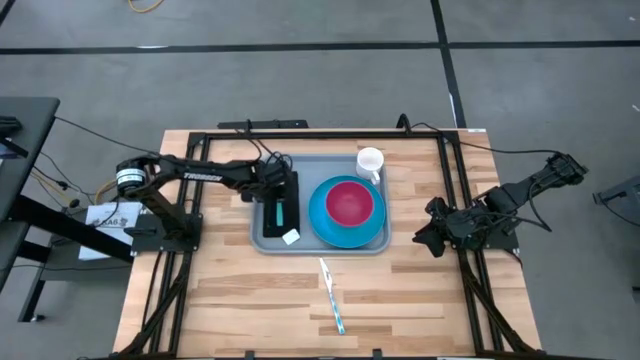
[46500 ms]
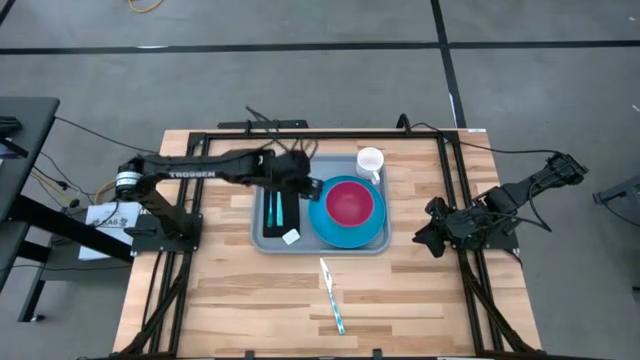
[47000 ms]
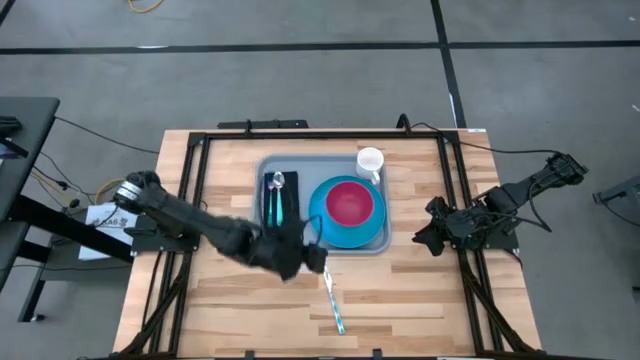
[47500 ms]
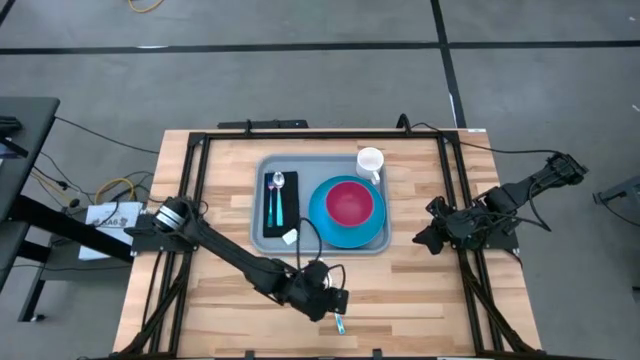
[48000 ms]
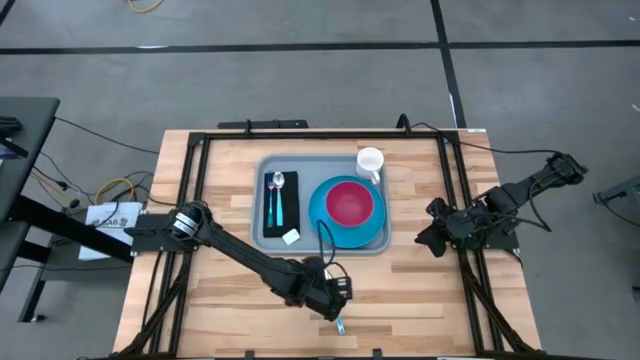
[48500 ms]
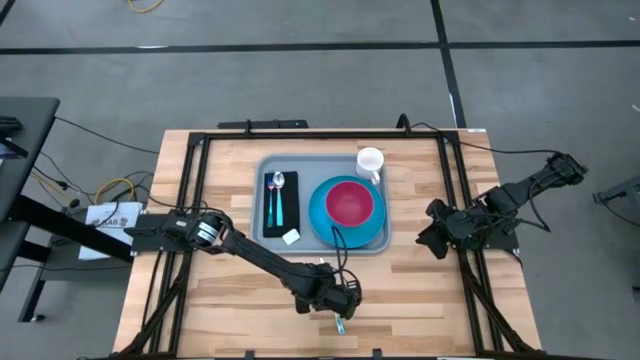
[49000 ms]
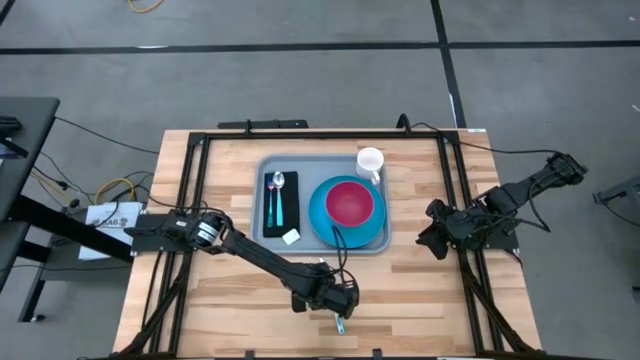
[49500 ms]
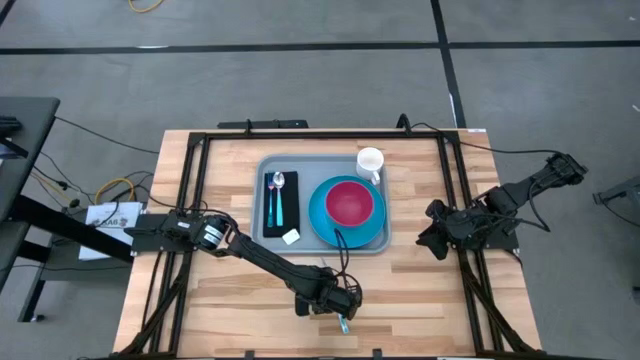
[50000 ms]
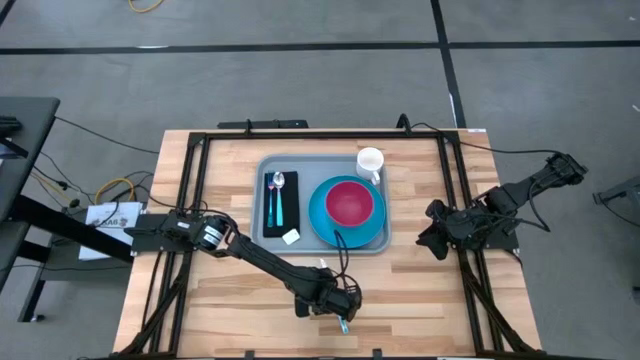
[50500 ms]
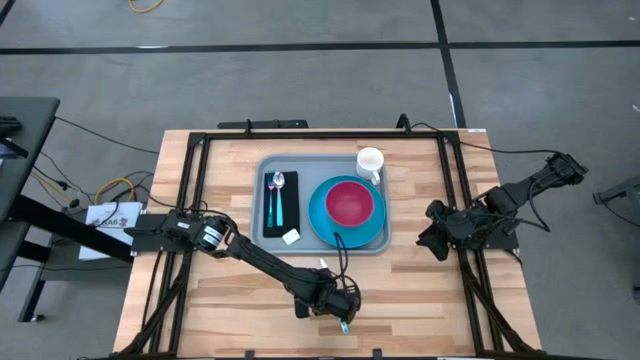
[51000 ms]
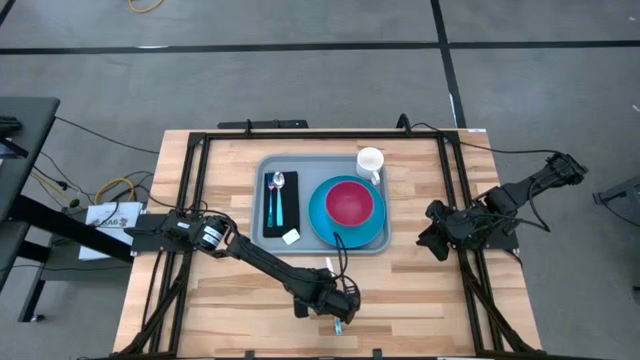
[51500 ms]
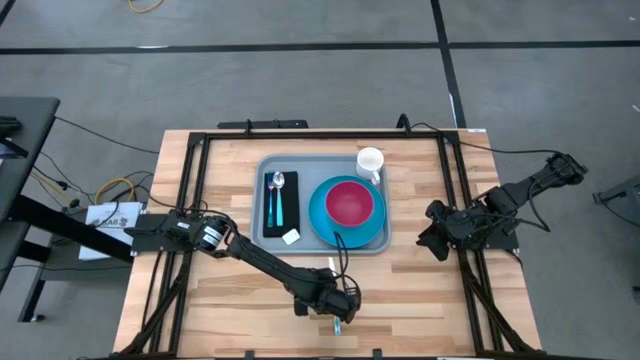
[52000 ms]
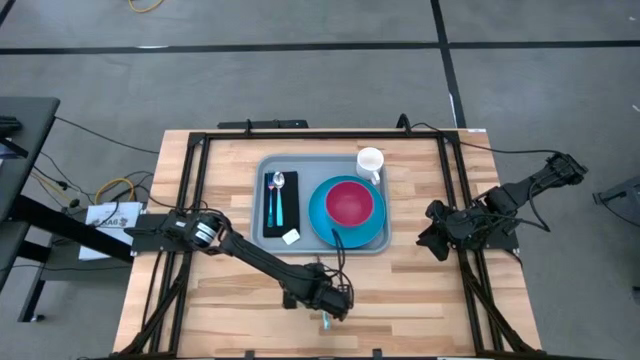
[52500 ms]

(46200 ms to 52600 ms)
Task: Set up tray
Put the light blue knife on the black napkin to the right side of the light blue spoon

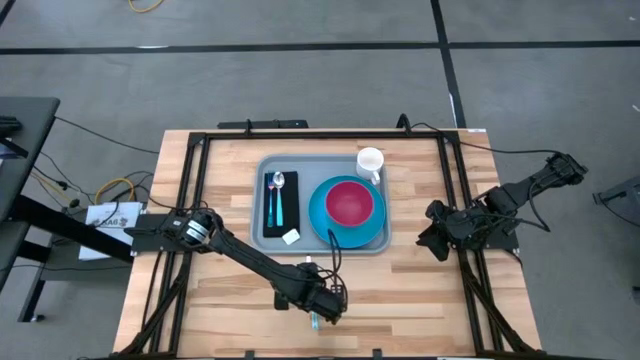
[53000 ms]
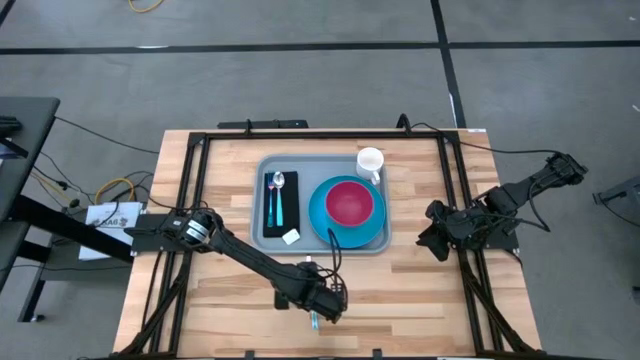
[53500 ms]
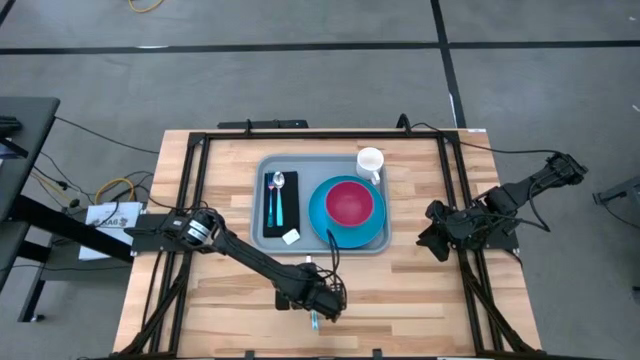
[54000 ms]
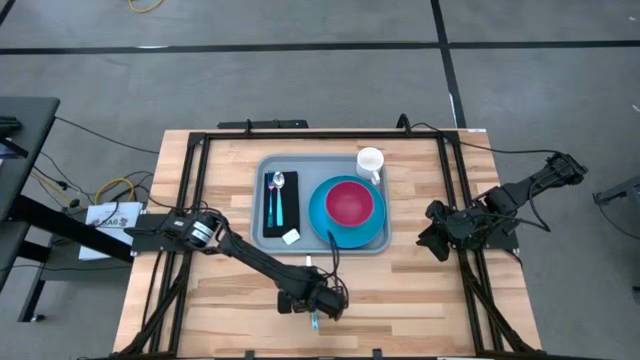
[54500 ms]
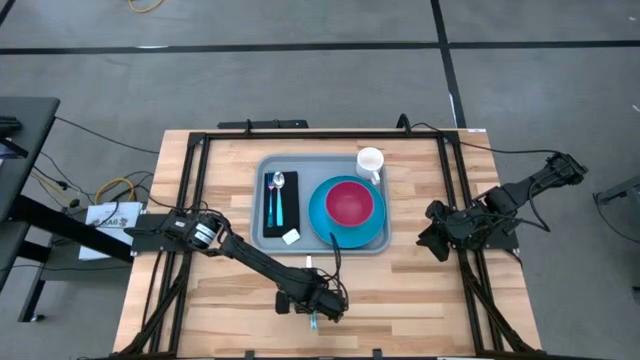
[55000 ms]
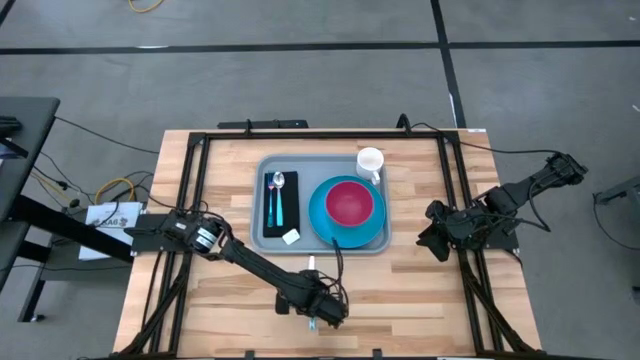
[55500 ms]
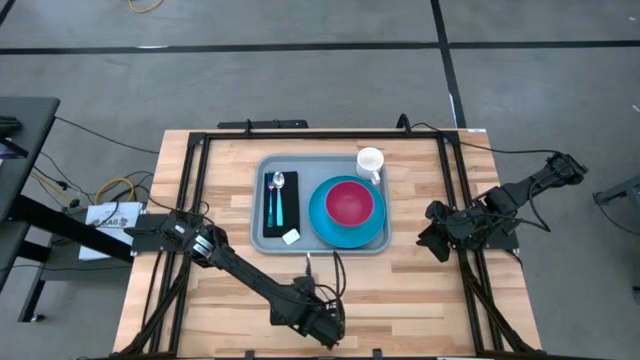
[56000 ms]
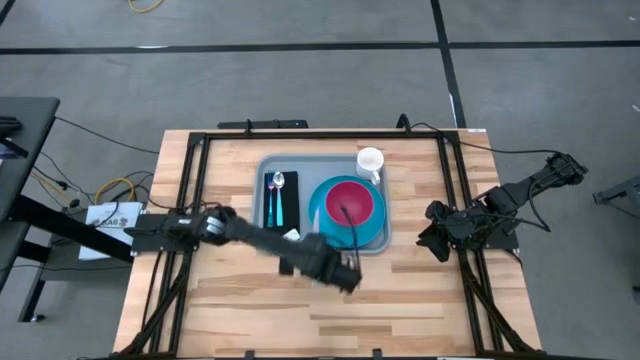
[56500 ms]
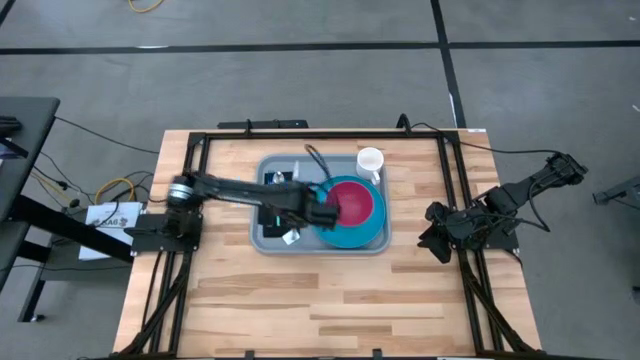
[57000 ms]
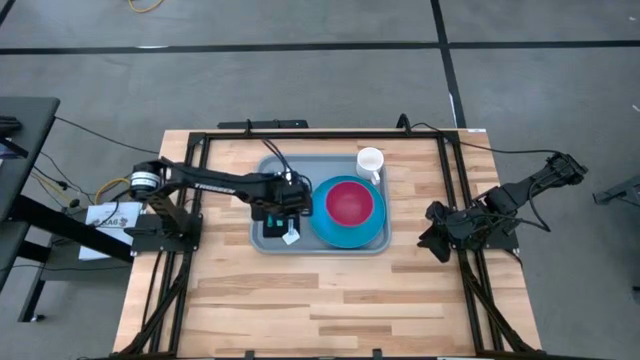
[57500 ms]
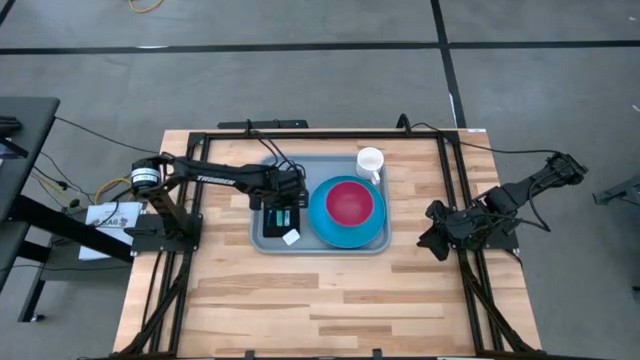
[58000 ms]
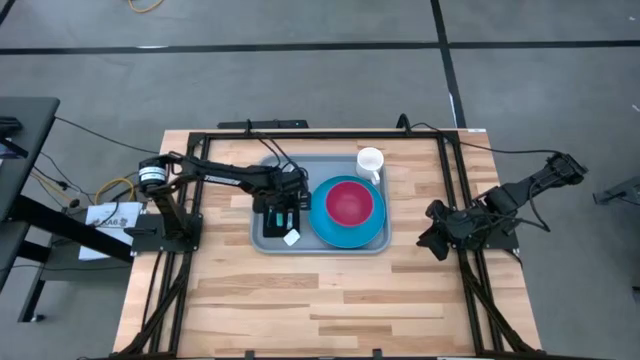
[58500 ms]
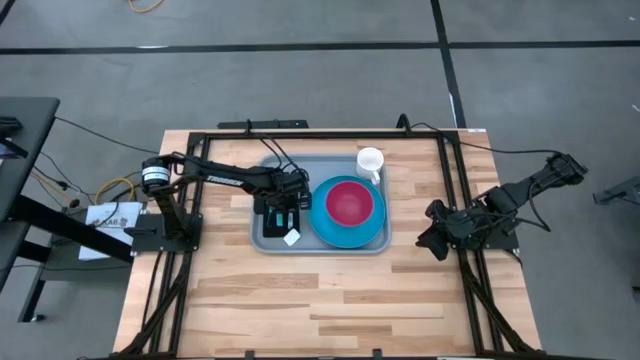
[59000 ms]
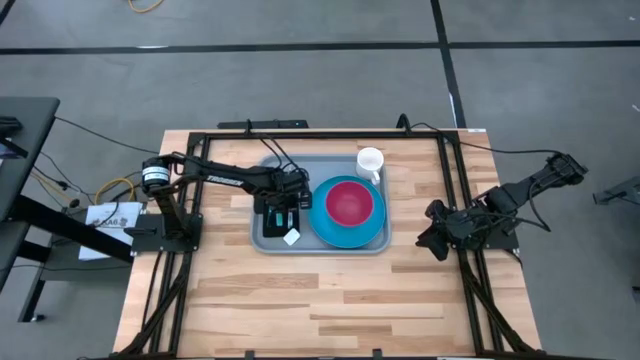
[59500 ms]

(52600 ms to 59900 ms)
Put the light blue knife on the black napkin to the right side of the light blue spoon

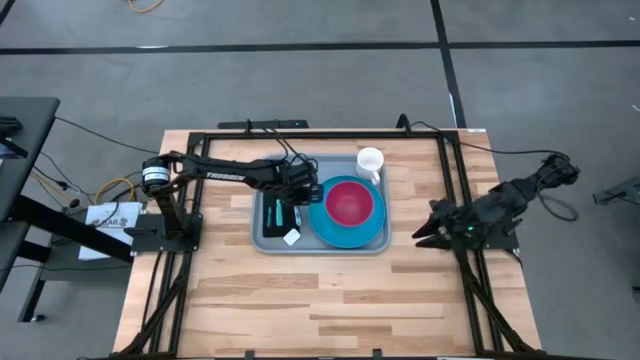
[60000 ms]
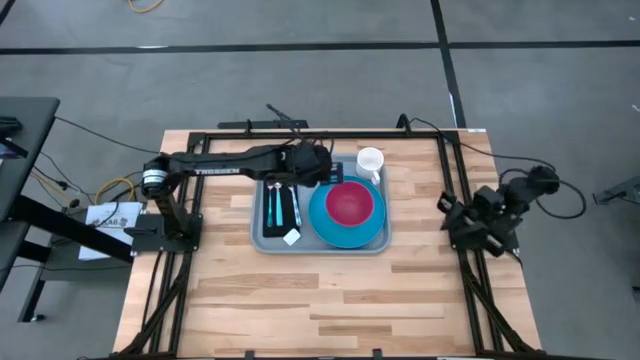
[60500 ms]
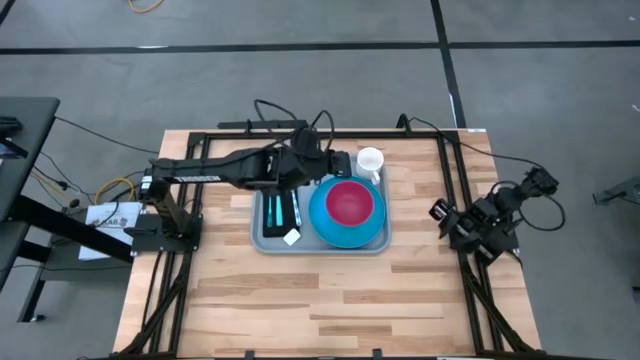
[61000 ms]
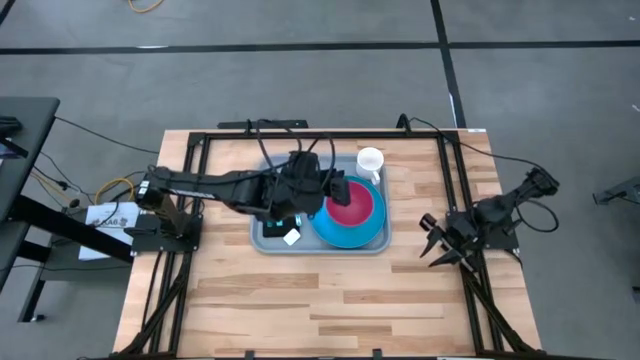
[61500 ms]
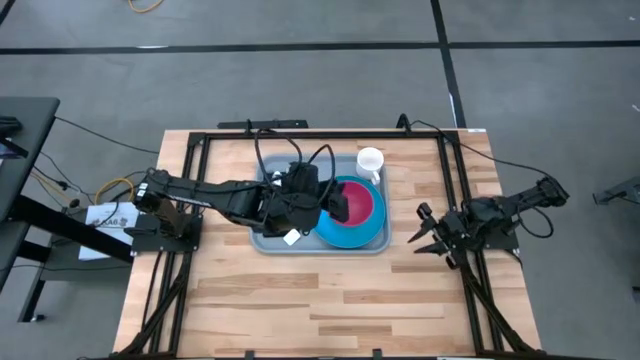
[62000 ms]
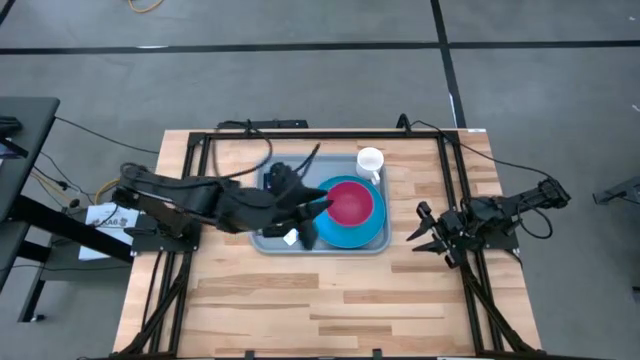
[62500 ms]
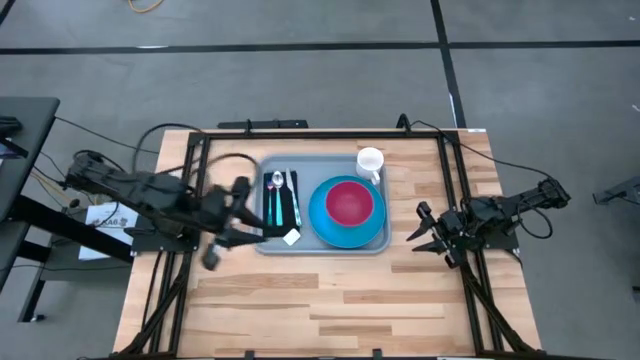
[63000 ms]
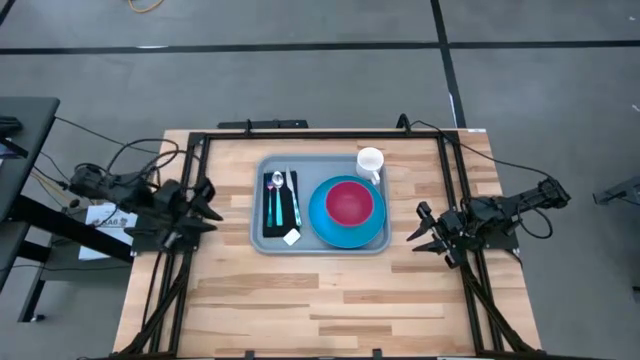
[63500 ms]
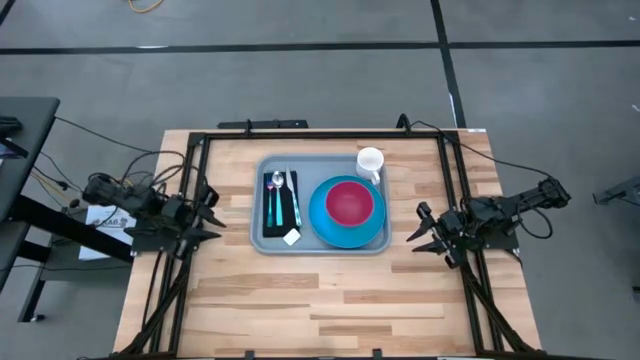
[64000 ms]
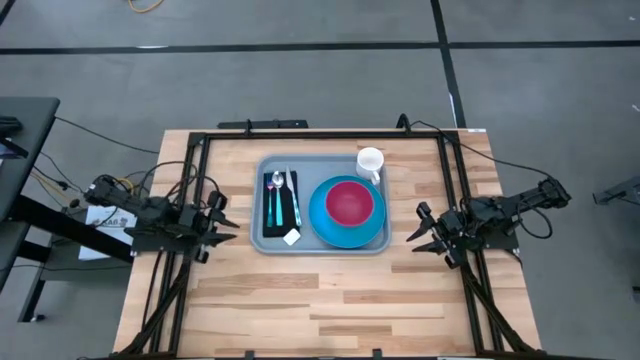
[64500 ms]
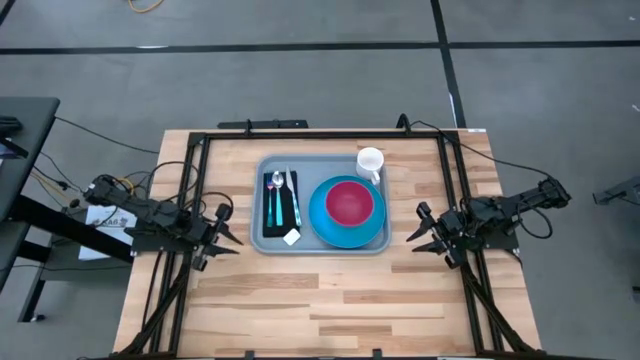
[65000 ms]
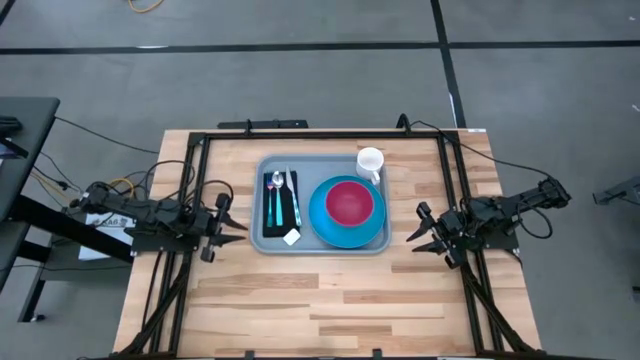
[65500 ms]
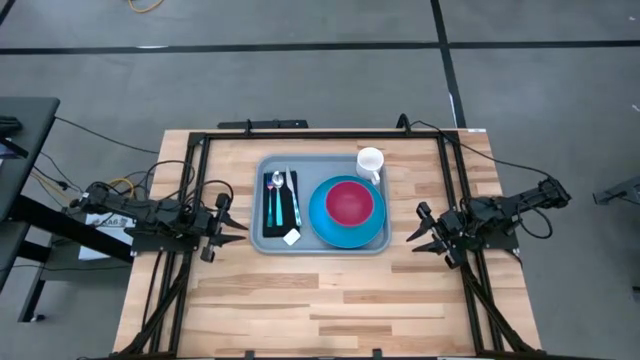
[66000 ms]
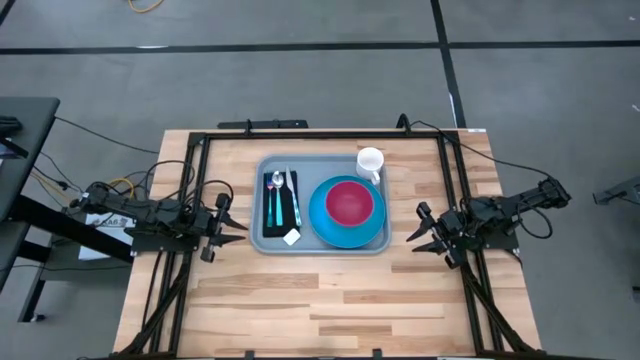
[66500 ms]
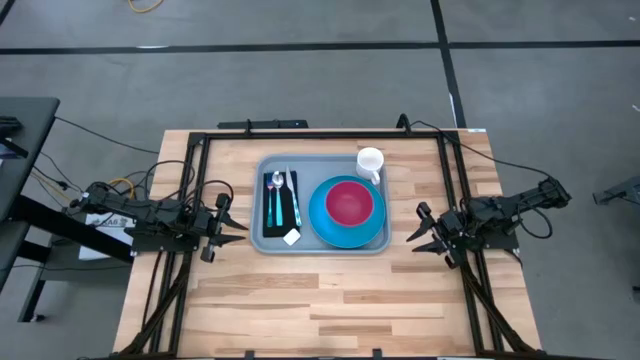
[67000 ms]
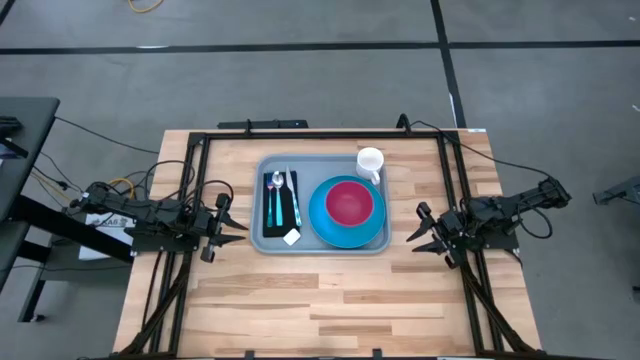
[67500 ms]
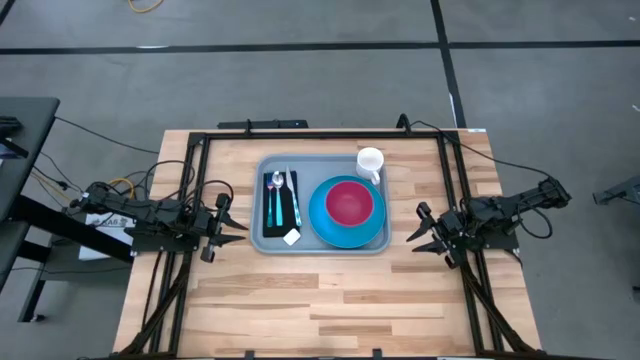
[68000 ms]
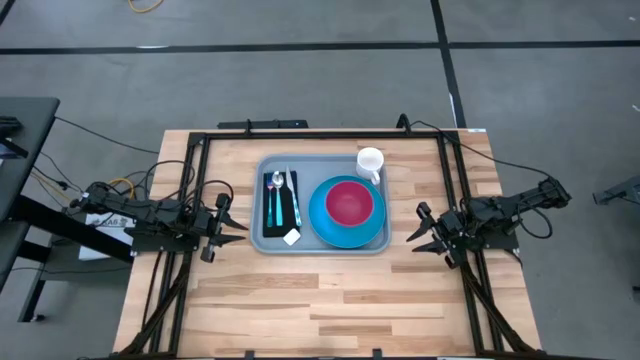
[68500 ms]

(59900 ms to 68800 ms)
Return to Home Position
